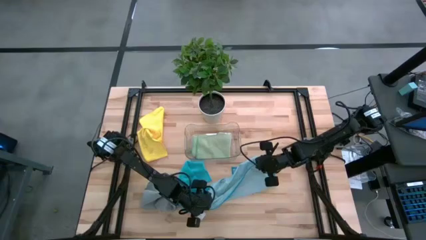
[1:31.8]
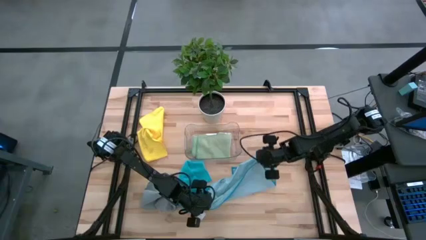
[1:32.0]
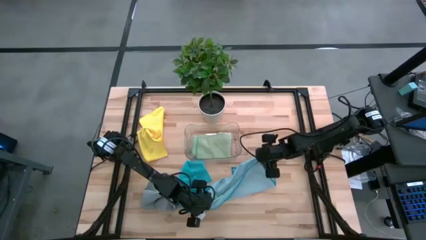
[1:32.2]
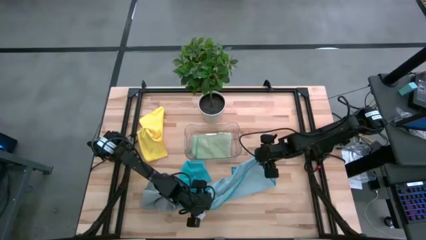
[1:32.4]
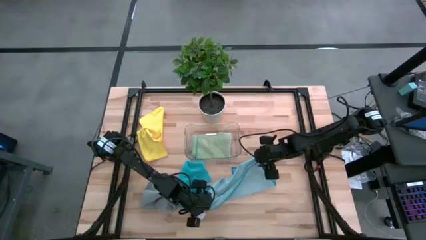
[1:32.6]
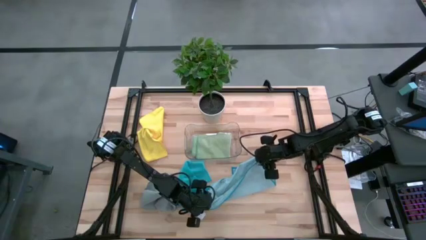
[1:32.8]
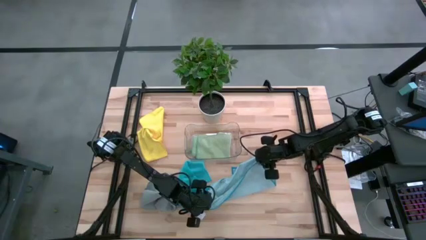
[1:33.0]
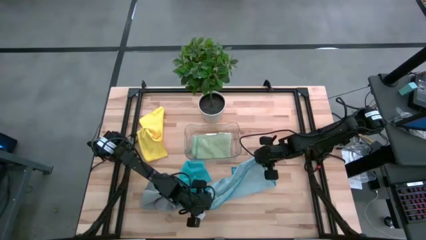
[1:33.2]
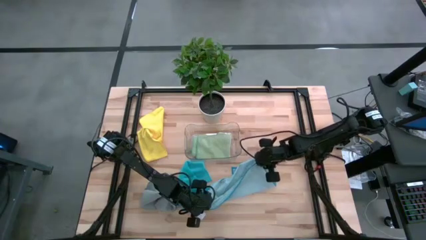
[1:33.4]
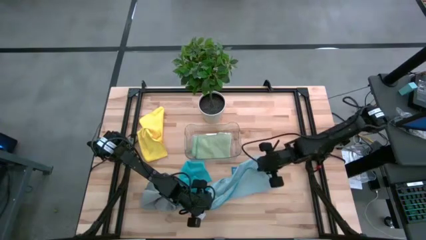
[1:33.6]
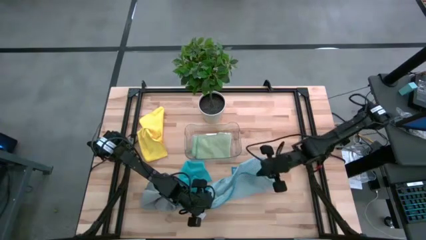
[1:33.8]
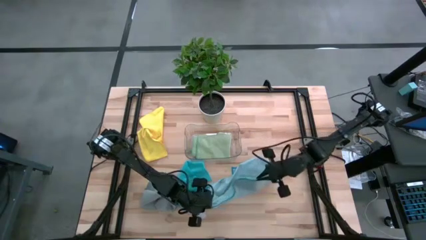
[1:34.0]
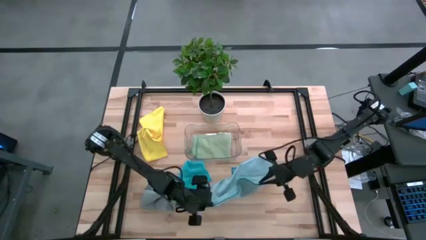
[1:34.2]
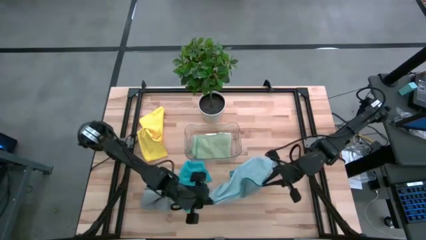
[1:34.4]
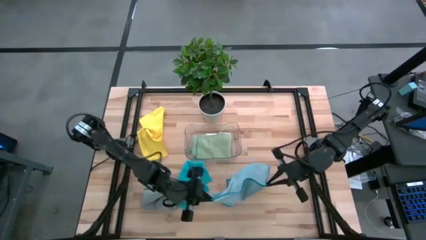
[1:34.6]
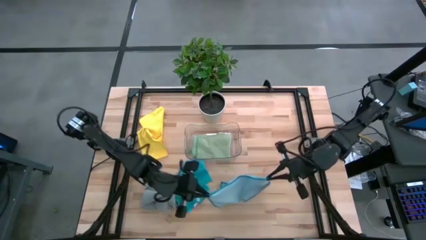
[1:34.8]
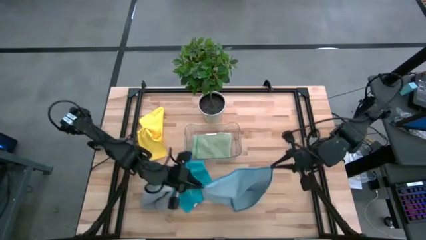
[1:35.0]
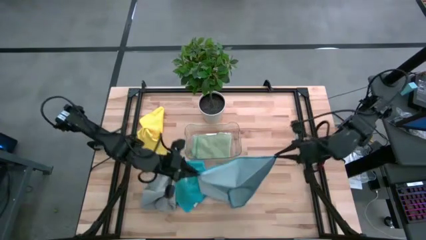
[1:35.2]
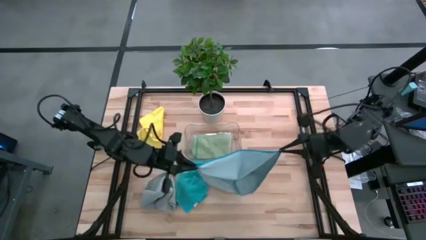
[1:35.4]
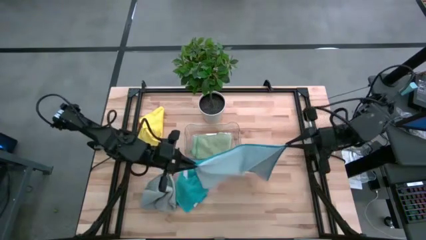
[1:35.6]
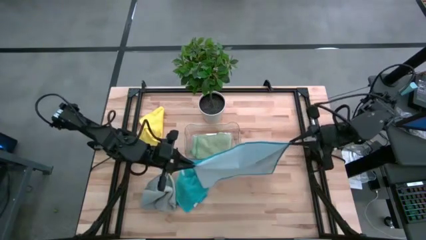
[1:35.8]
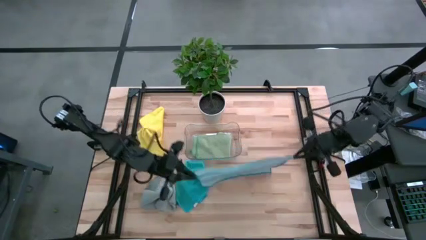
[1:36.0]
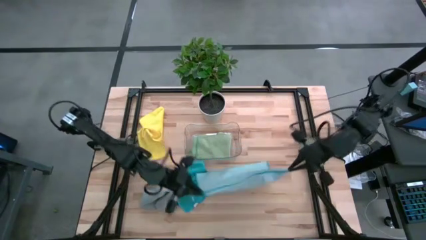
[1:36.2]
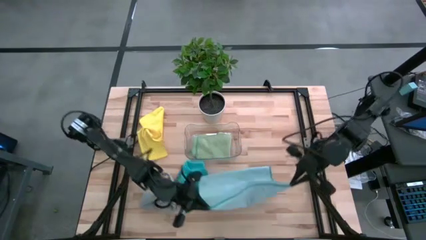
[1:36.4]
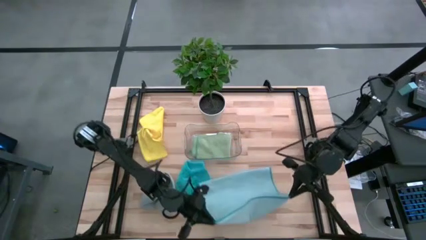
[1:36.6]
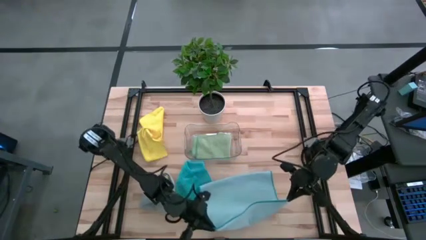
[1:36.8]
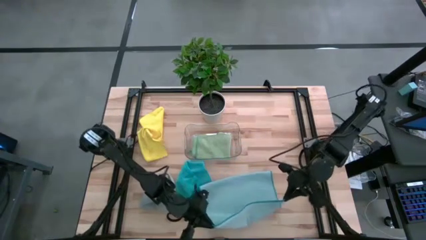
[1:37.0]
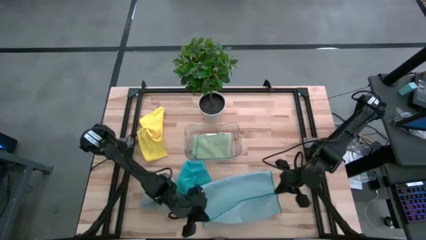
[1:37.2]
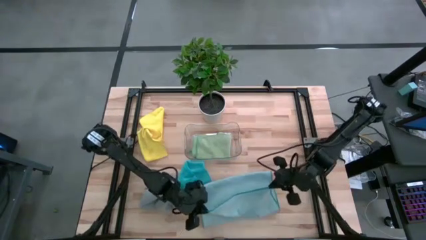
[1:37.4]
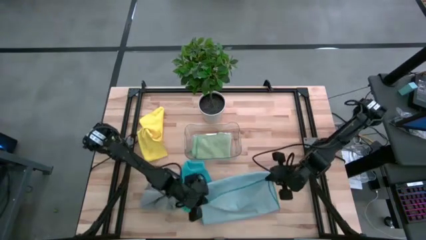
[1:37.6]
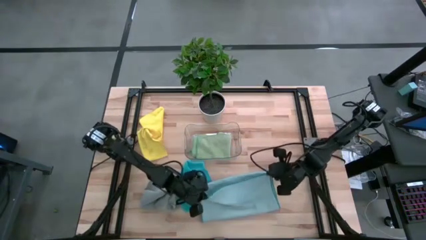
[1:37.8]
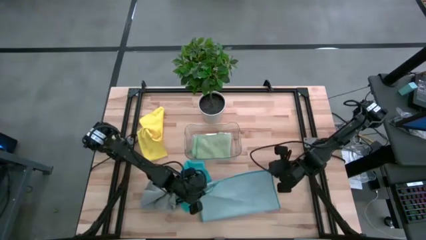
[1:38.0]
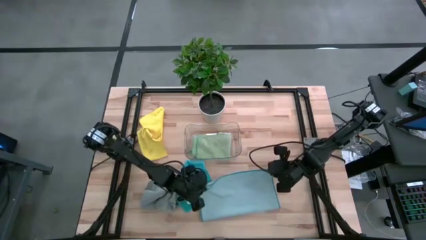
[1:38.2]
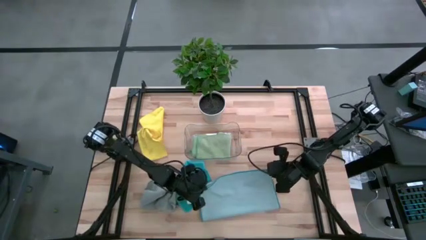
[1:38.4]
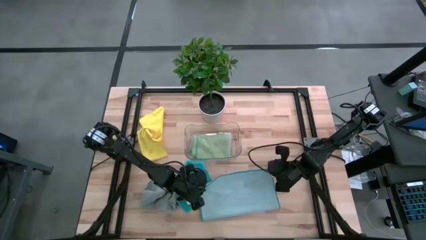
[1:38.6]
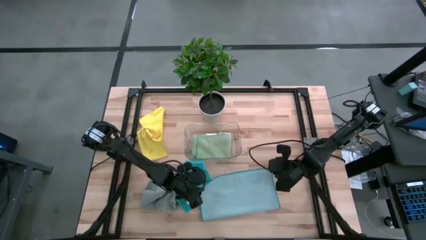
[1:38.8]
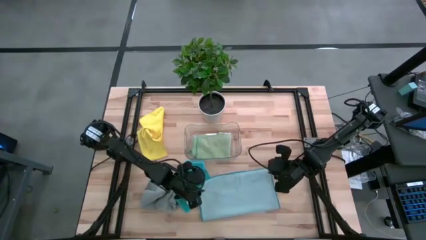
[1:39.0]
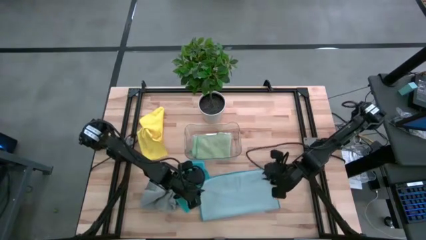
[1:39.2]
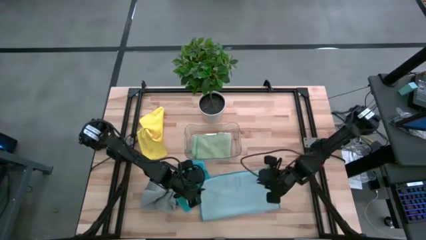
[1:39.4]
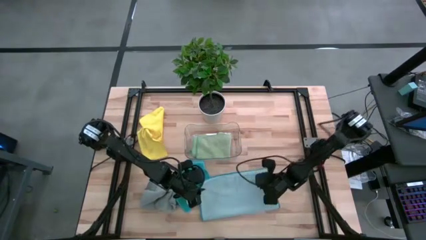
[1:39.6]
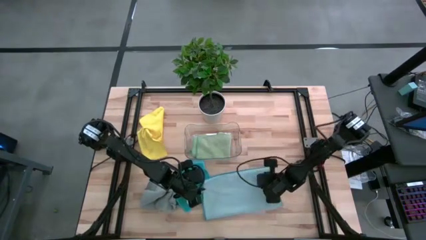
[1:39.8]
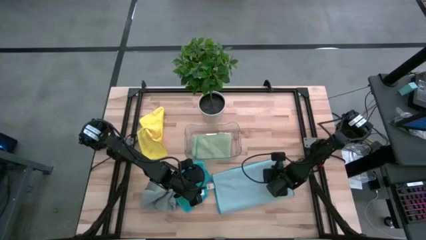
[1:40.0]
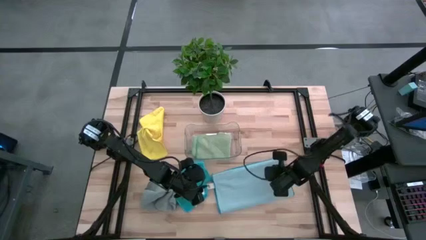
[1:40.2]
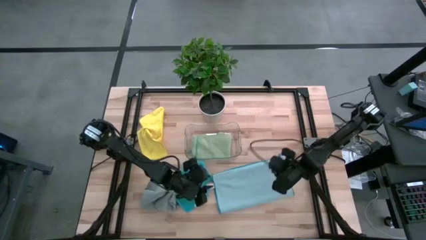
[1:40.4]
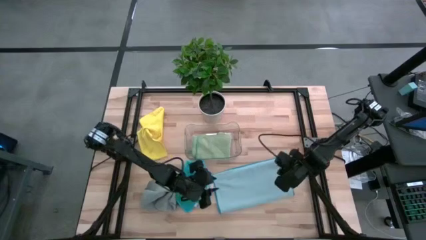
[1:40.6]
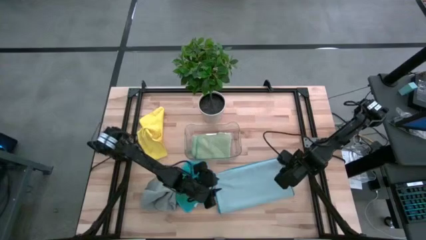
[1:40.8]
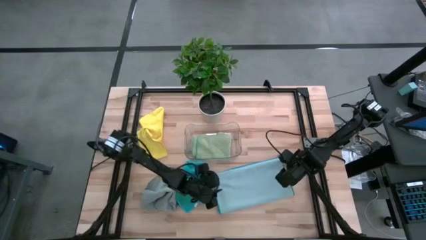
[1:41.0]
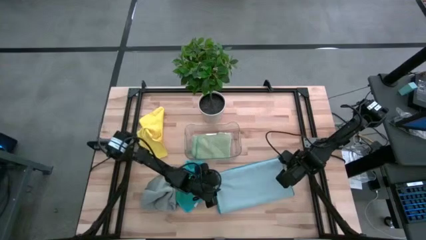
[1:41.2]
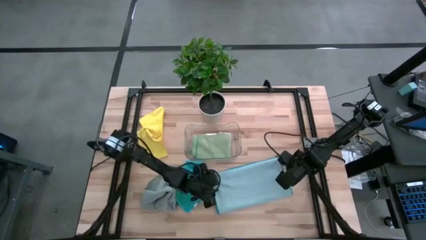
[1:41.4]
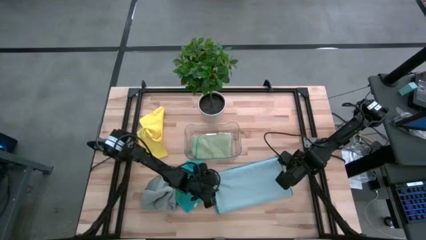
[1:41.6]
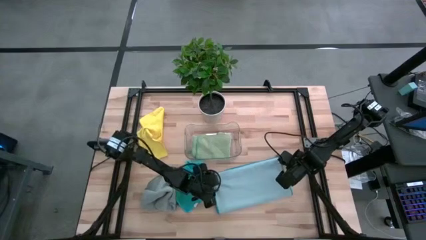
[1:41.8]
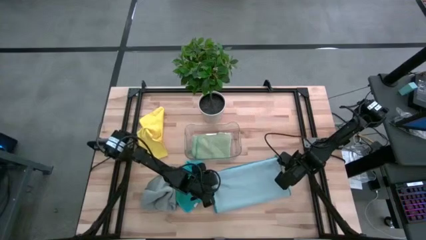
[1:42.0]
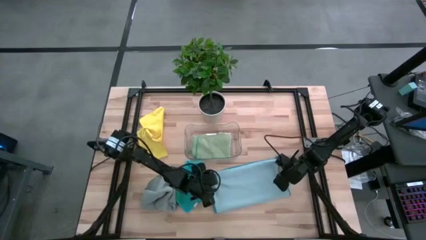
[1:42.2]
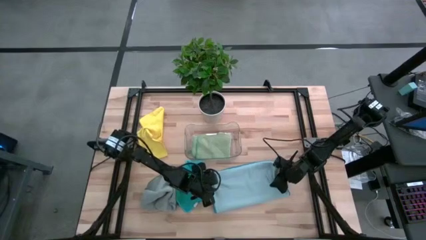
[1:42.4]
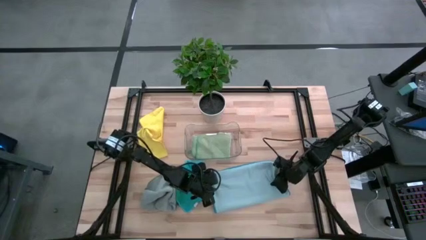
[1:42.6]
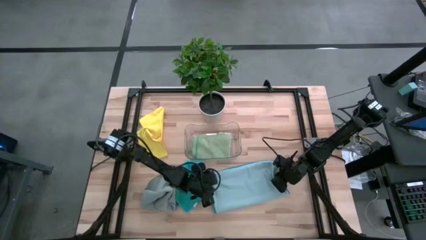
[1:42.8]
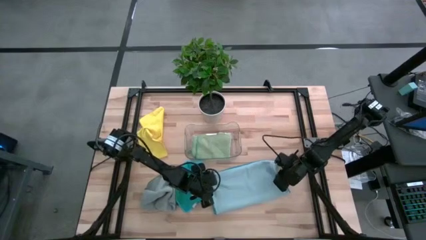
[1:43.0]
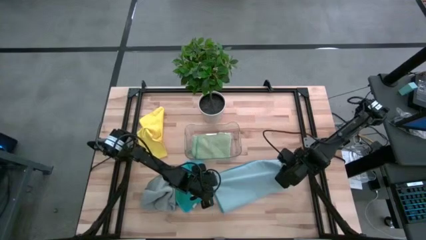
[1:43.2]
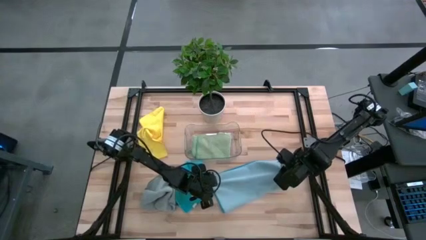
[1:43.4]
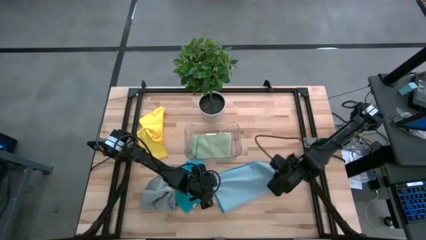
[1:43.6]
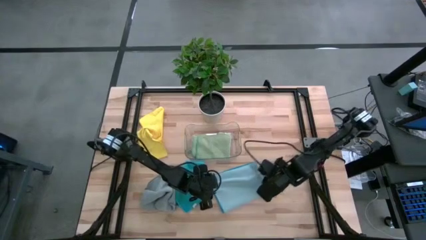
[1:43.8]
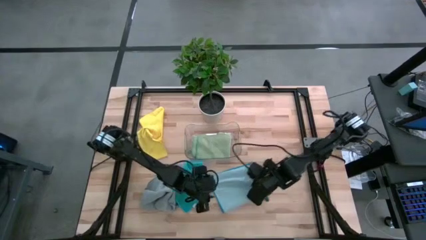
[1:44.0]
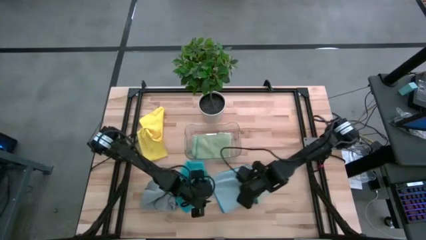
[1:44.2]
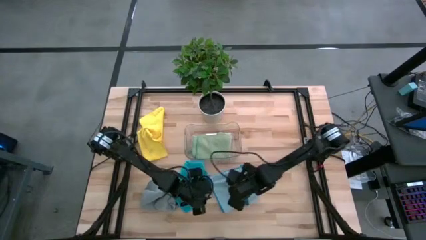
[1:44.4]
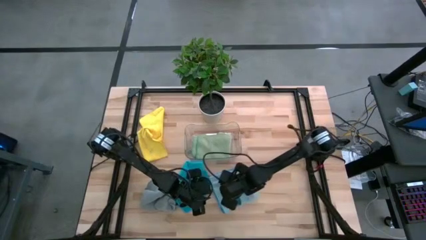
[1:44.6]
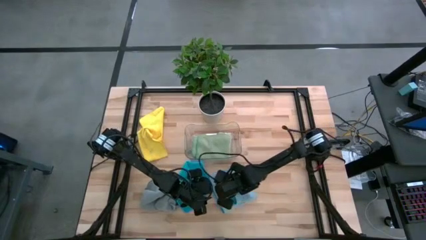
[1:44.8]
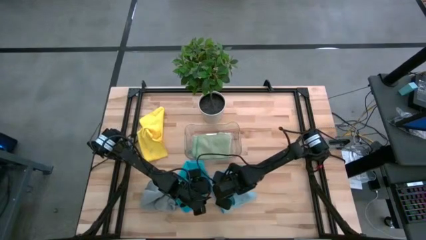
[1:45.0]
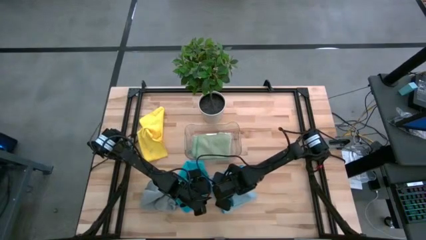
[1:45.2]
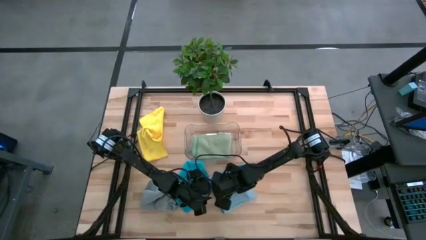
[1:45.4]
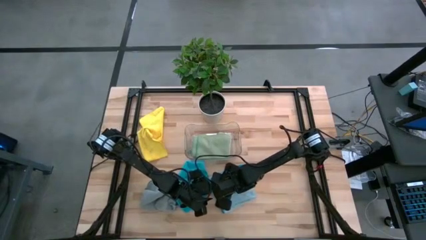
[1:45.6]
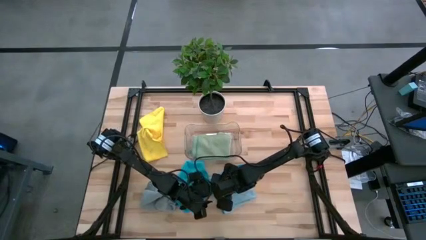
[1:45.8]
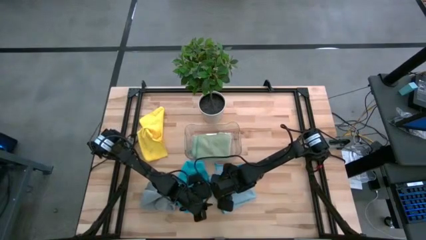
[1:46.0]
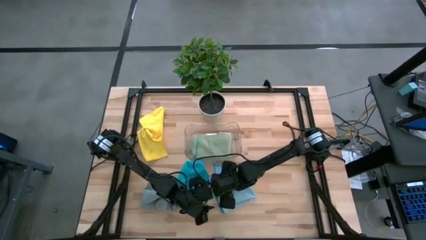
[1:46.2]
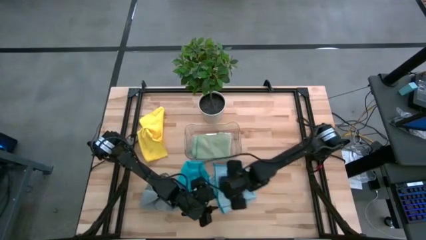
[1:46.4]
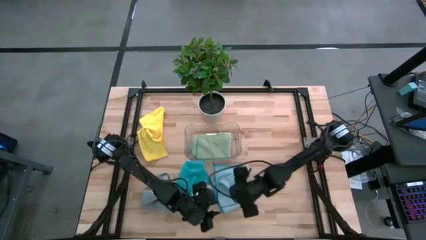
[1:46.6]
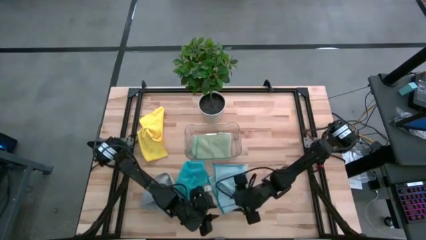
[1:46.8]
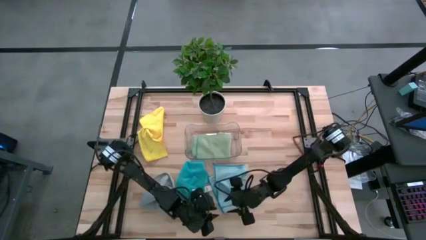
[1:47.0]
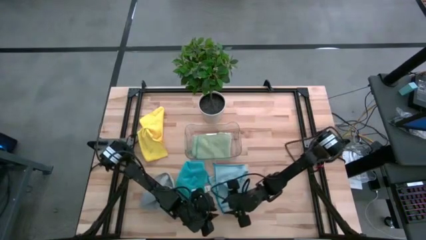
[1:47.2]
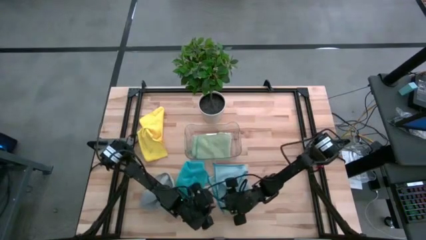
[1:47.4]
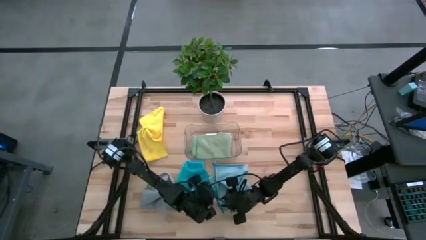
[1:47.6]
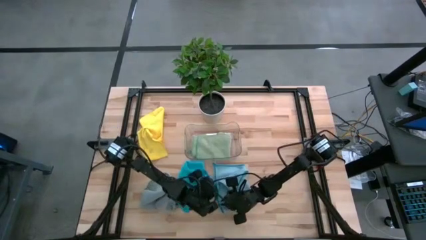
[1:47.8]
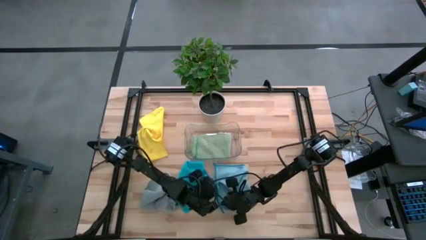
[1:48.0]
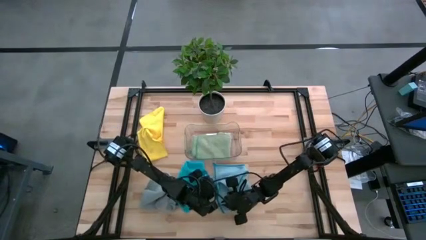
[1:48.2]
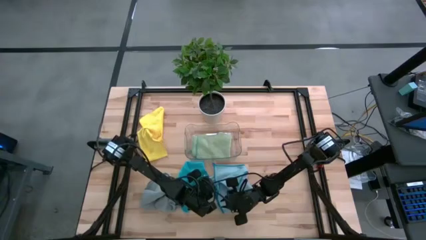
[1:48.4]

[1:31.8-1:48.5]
Task: Fold microfiber towels
Fold the light blue microfiber cloth
